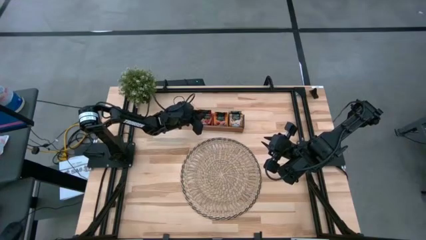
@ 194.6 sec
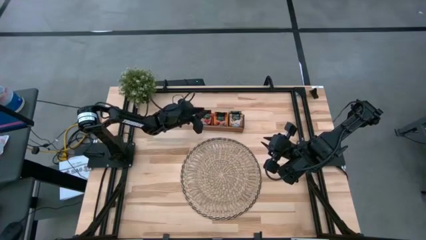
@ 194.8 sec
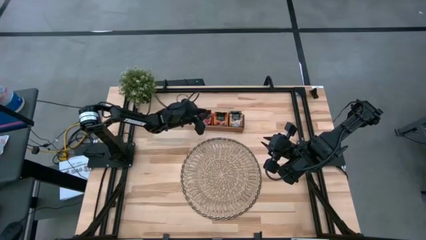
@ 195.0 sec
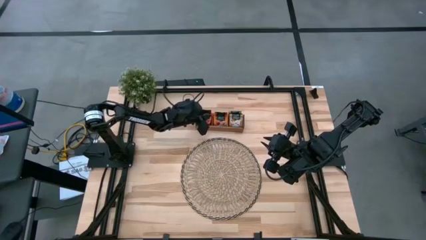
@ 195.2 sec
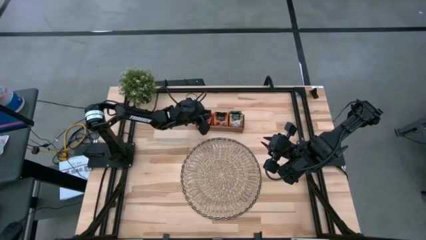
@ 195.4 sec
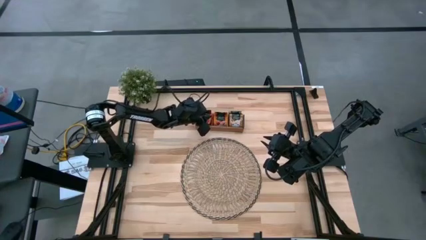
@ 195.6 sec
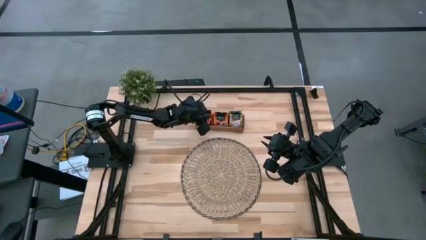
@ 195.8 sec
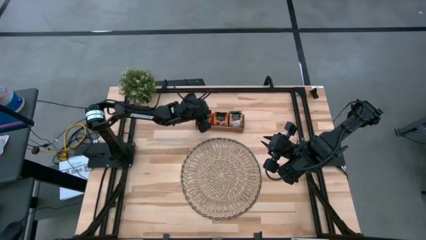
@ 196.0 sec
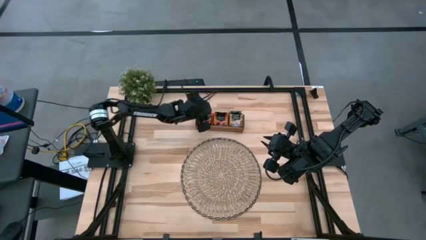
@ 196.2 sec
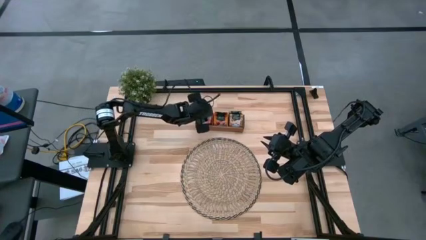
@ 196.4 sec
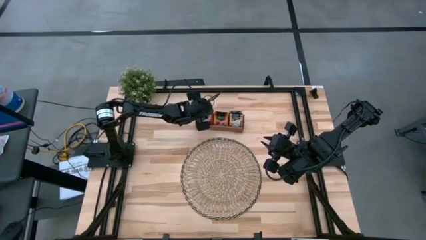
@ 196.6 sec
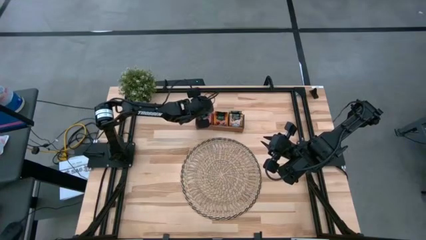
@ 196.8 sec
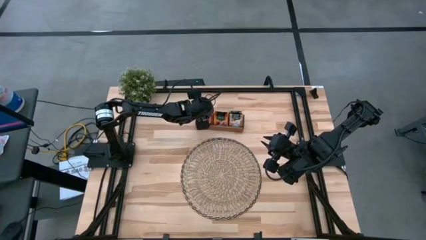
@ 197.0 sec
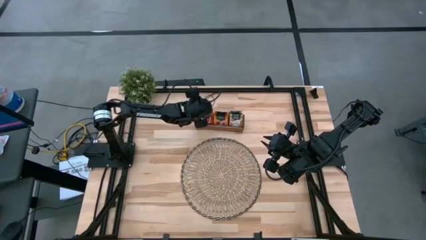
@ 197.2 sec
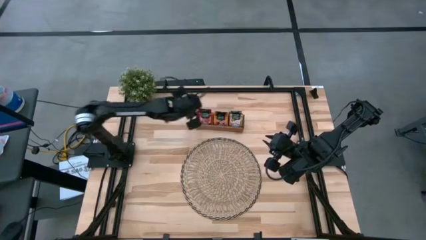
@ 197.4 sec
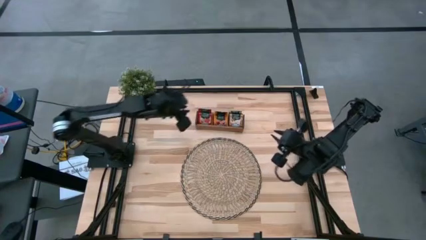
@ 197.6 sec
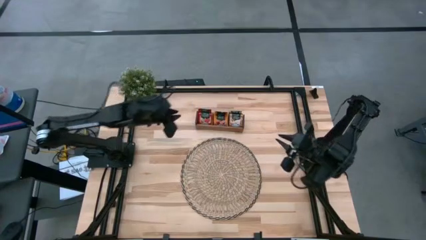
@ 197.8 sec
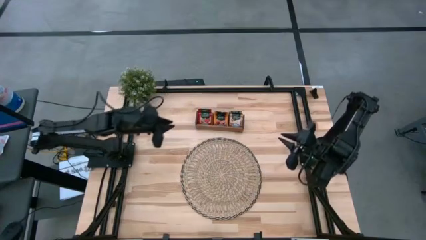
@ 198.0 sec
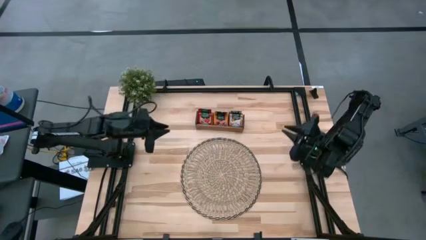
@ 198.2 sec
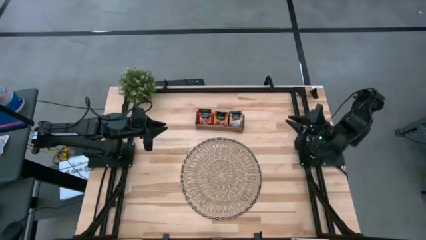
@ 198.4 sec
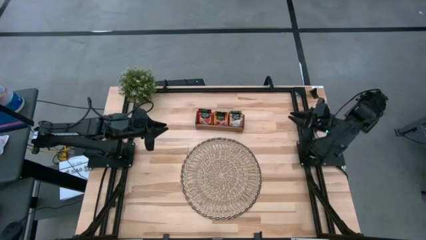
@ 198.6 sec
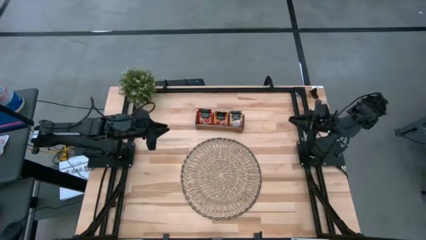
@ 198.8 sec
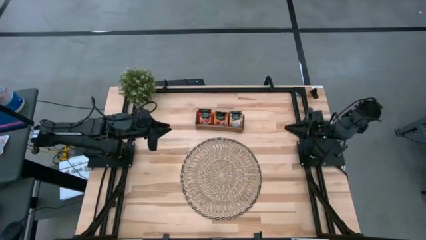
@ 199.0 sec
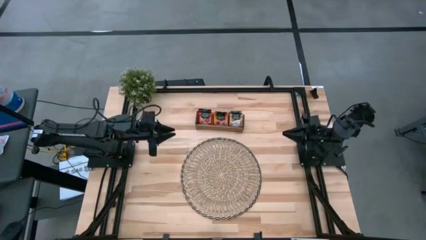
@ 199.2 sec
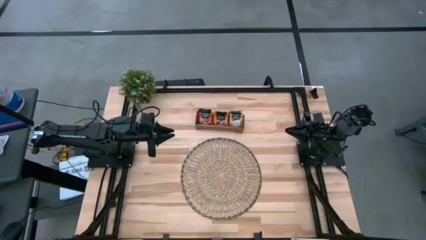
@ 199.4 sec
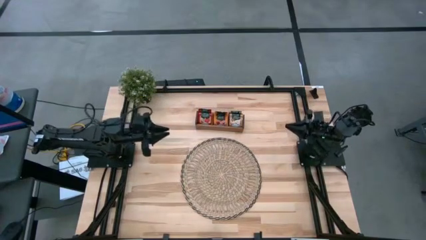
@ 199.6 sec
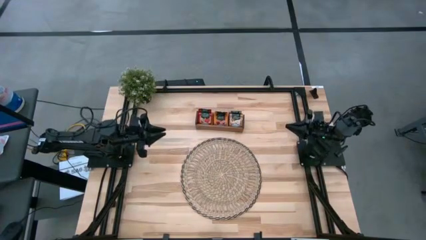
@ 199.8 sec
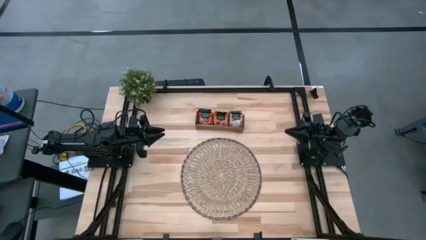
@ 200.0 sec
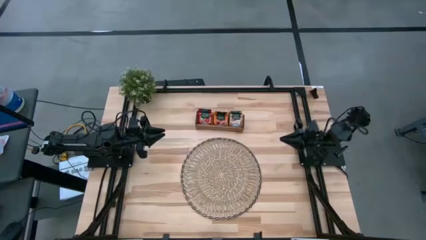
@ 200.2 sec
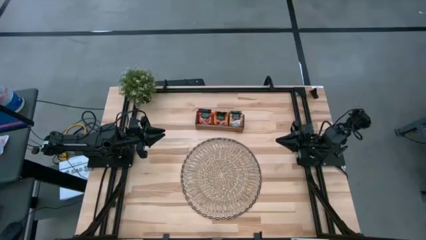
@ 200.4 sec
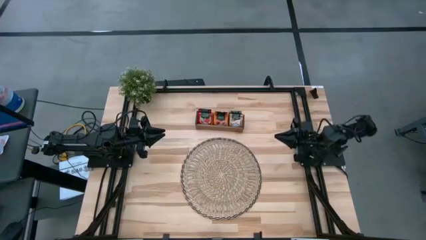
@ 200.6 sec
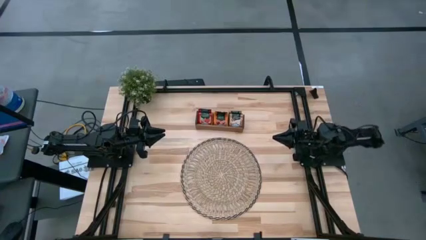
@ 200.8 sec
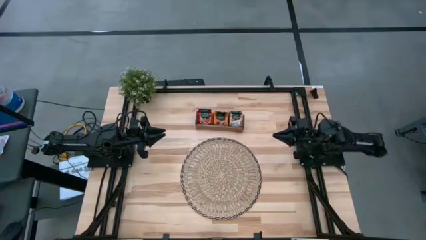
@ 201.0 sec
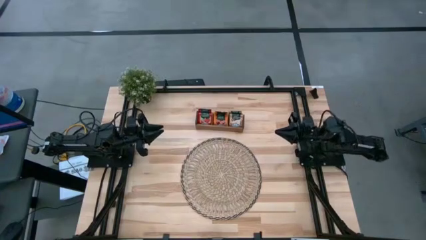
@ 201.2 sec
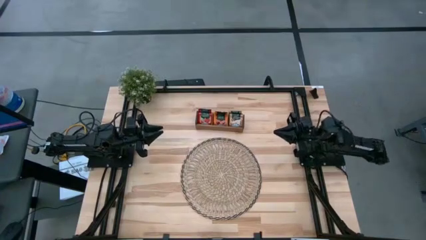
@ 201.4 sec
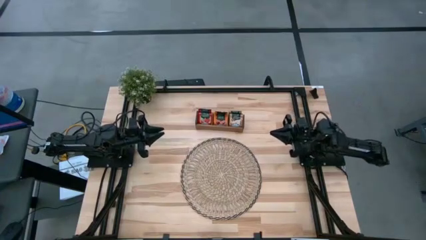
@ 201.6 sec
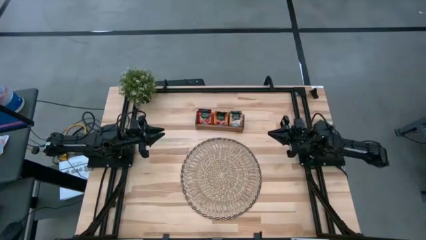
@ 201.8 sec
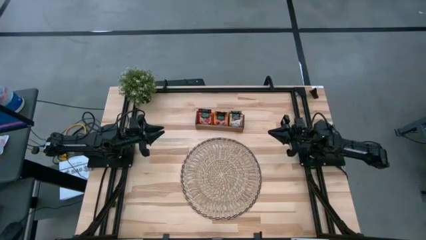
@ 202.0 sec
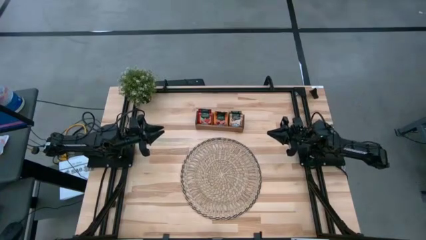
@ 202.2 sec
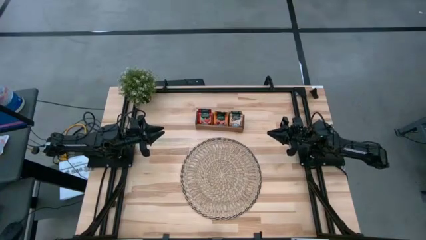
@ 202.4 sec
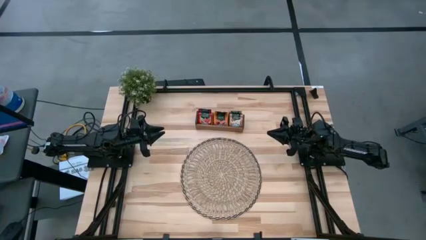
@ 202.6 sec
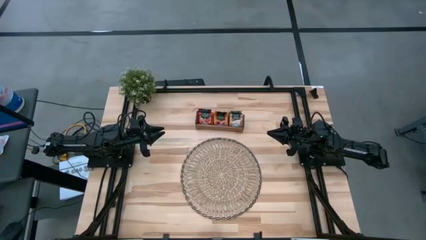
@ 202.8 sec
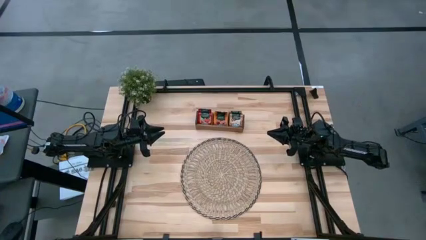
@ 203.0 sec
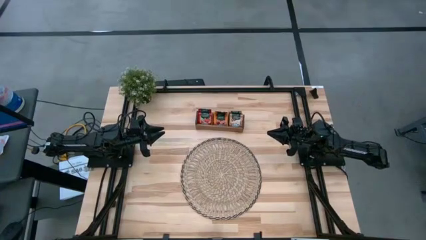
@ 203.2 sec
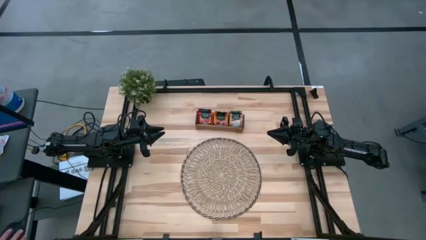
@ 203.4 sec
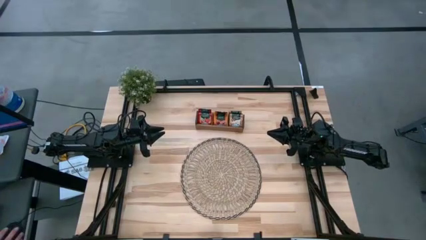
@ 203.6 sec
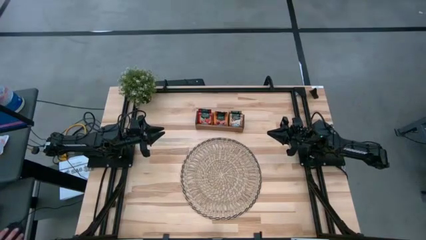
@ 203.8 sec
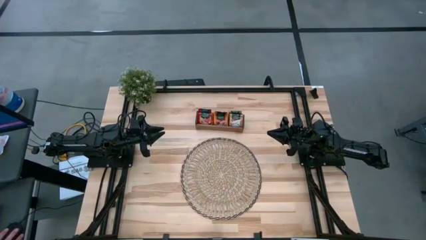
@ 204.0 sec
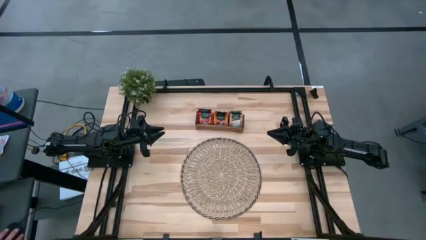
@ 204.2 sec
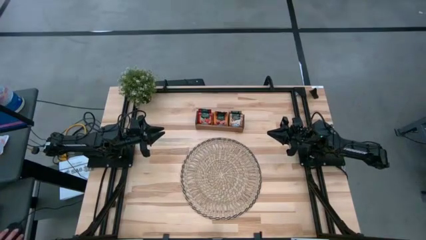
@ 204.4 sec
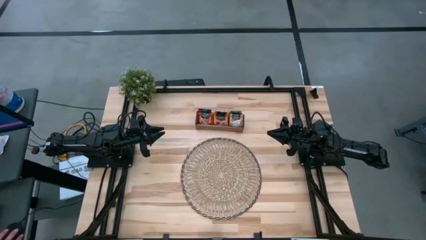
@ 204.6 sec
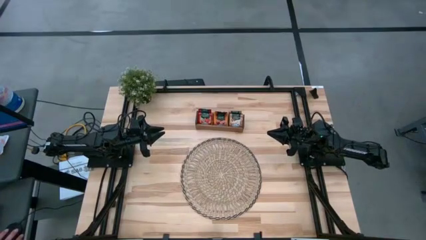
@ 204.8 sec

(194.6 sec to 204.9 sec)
Task: Pick & Place Tea
Return to Home Position

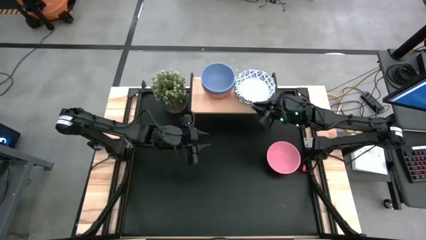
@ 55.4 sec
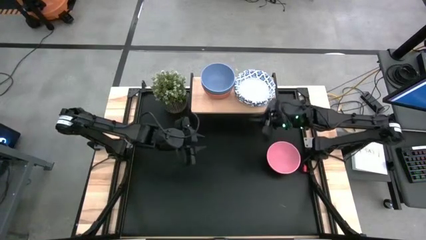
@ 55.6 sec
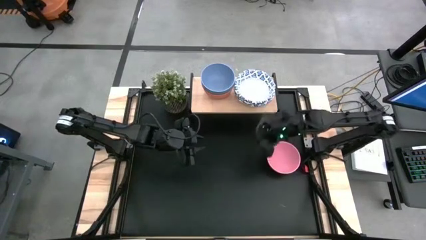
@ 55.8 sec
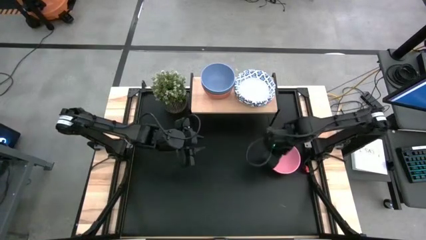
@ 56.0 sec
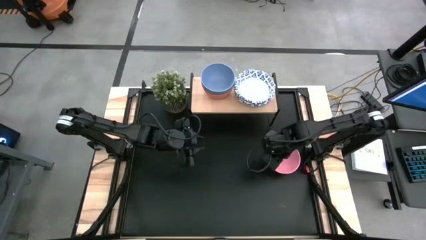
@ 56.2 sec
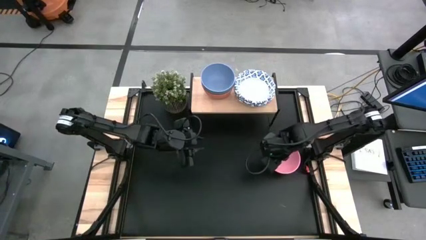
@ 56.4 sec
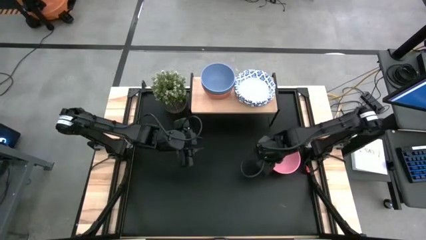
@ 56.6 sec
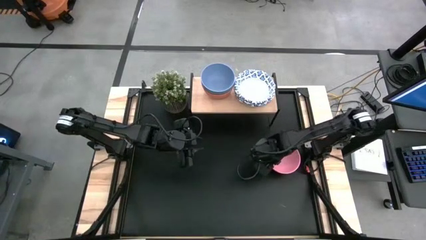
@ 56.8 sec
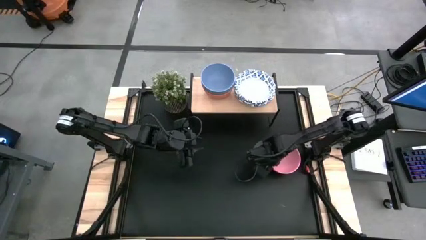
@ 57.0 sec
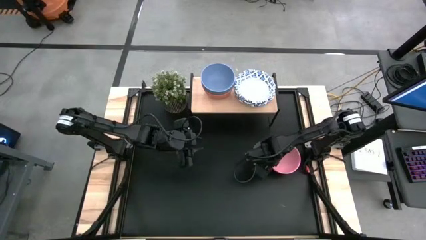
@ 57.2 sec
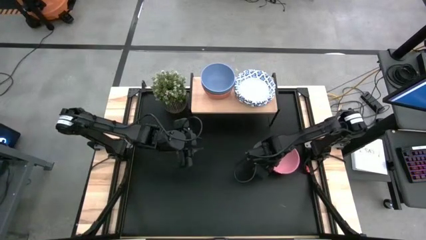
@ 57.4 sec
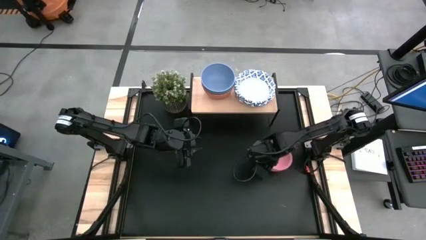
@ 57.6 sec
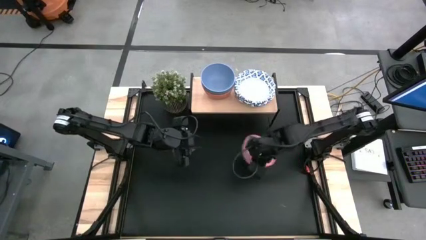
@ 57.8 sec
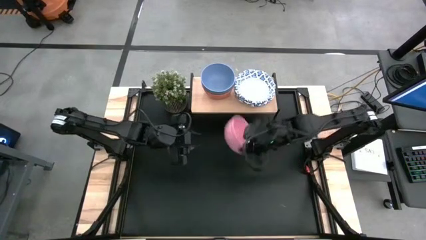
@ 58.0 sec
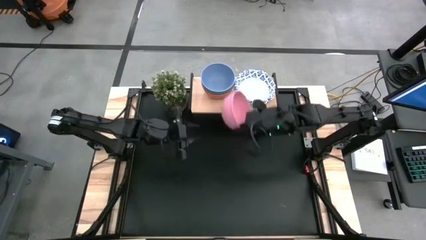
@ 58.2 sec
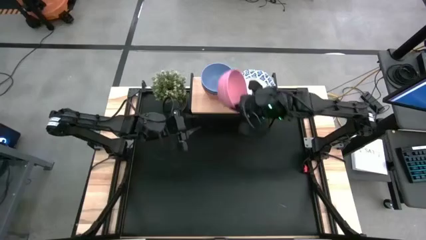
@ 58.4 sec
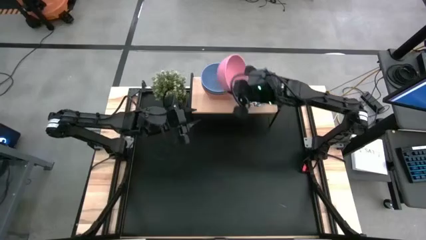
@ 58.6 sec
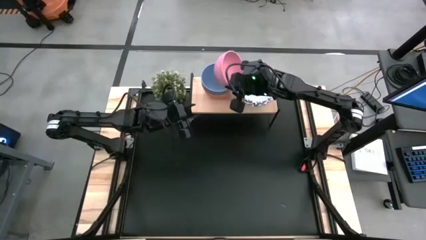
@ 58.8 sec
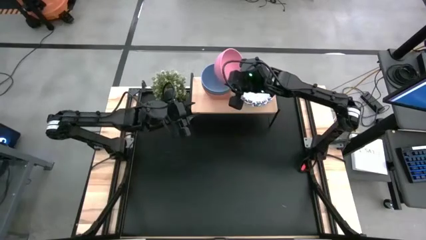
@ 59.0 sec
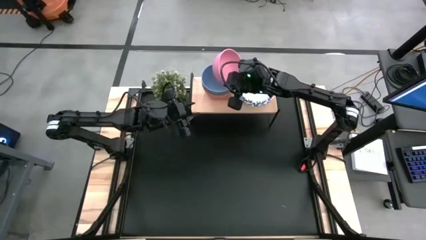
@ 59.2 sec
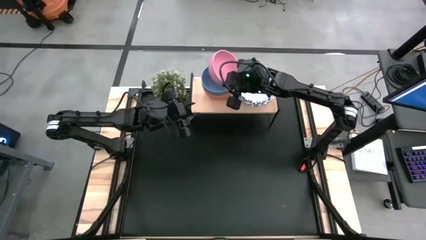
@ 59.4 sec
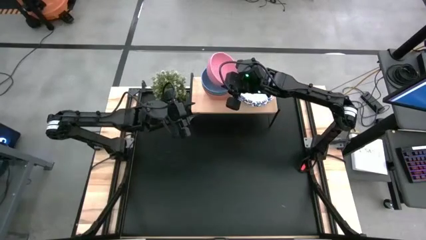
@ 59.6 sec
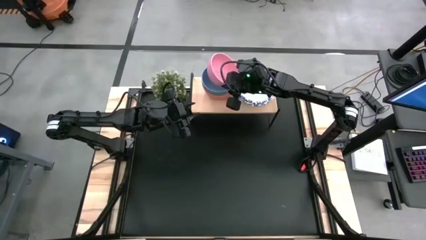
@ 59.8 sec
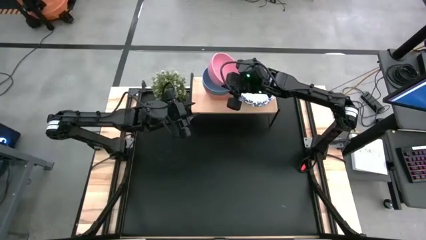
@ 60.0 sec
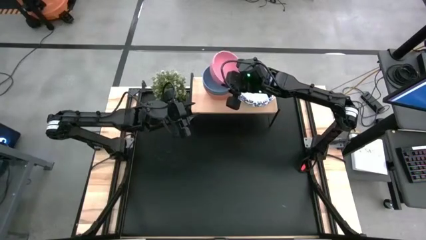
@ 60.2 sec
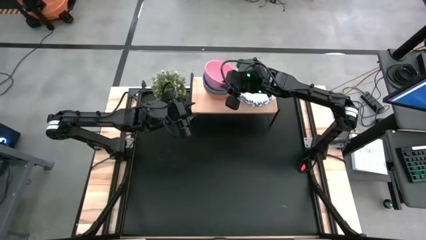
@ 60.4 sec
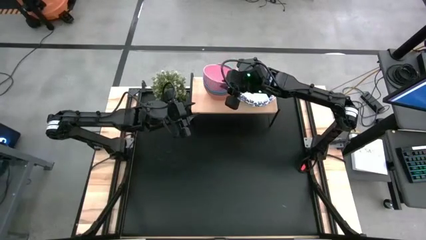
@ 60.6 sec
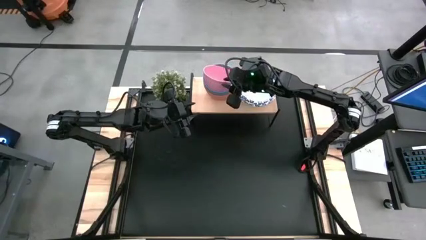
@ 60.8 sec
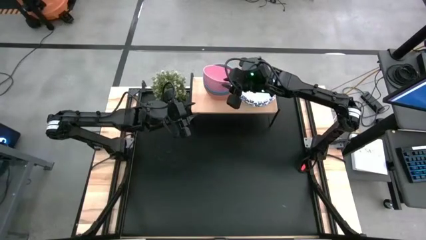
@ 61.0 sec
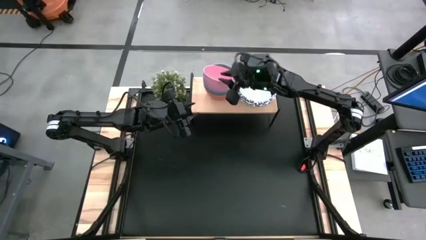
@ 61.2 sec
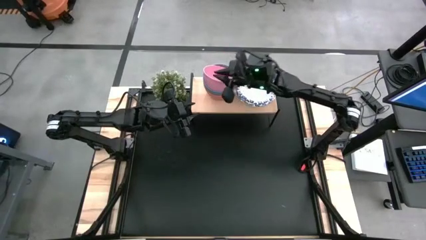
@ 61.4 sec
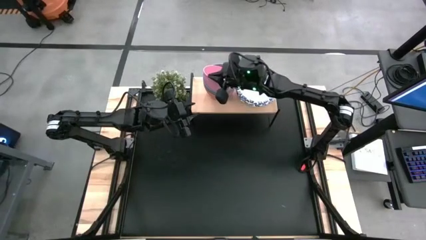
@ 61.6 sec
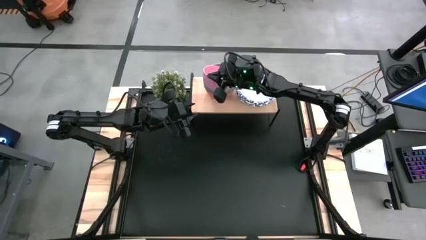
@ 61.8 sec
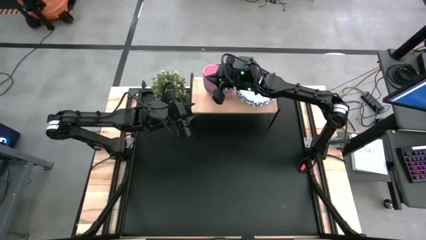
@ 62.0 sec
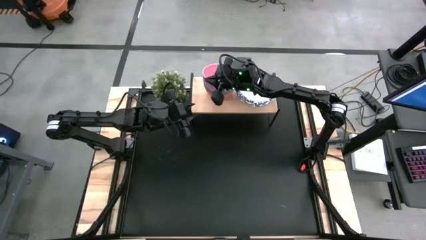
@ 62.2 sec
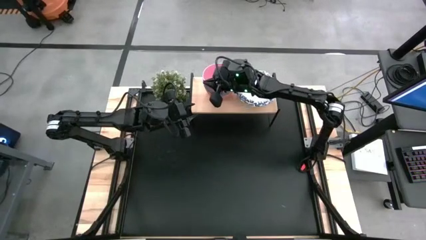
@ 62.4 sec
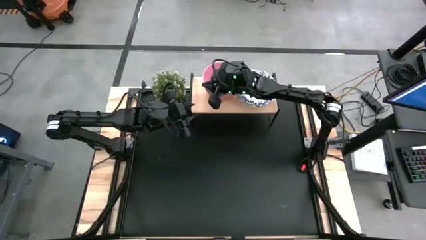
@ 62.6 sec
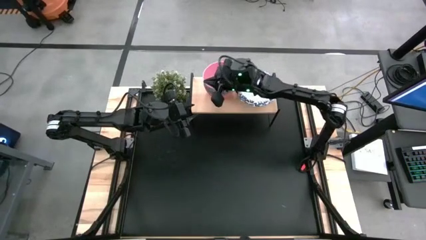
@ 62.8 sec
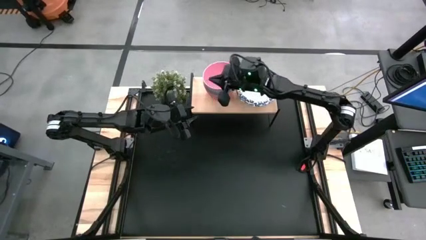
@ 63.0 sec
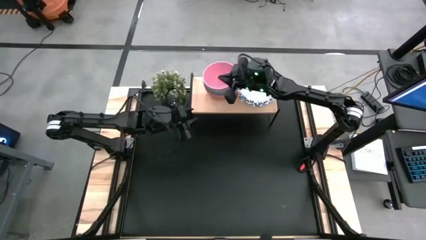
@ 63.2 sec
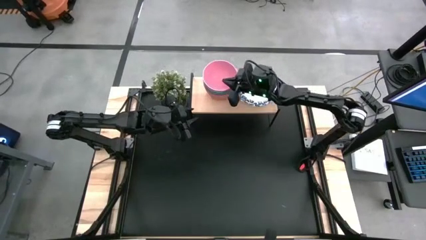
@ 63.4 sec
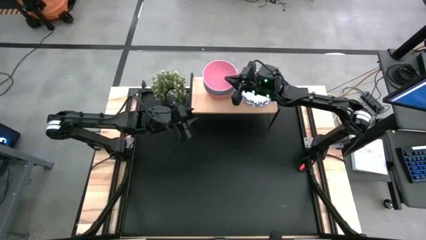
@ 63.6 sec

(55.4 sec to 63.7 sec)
Task: Place and stack bowls onto a shelf
Stack the pink bowl on top of the blue bowl on the shelf
